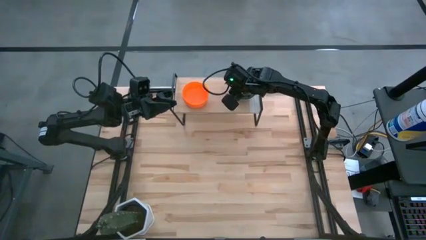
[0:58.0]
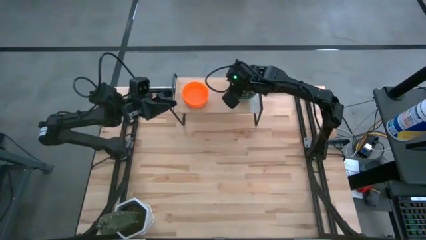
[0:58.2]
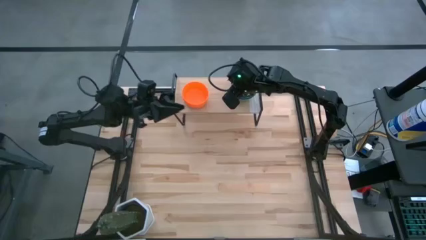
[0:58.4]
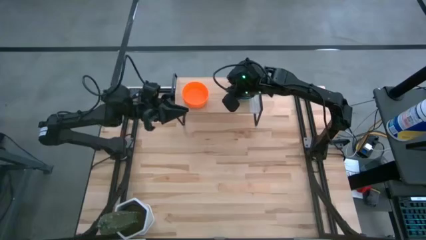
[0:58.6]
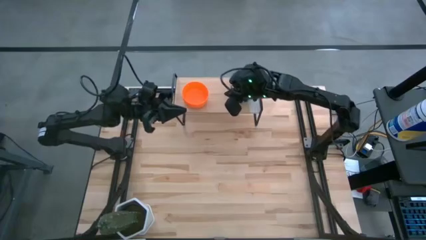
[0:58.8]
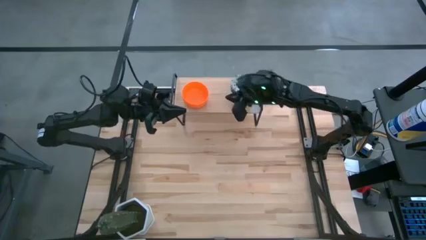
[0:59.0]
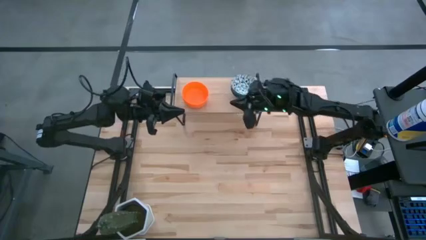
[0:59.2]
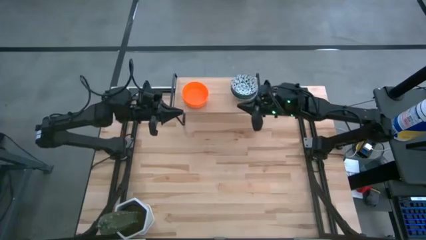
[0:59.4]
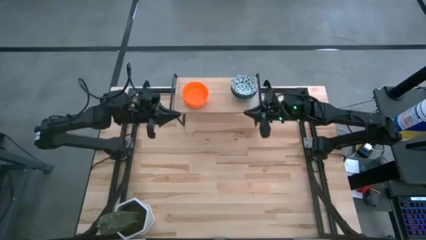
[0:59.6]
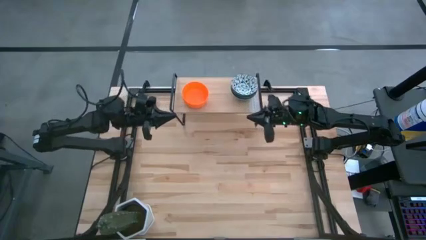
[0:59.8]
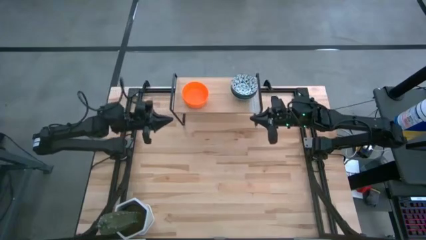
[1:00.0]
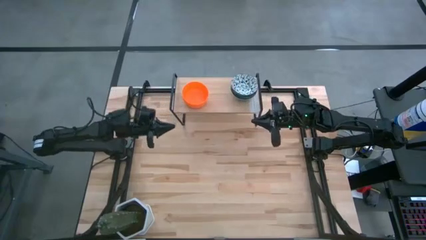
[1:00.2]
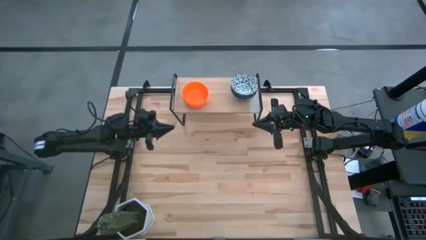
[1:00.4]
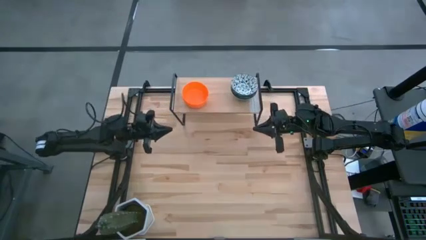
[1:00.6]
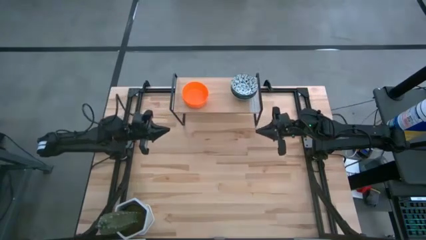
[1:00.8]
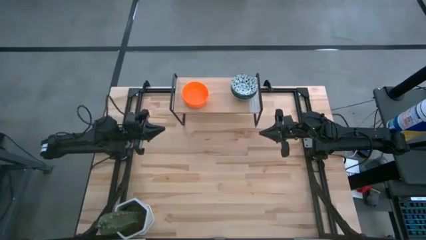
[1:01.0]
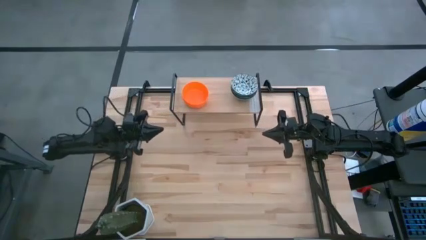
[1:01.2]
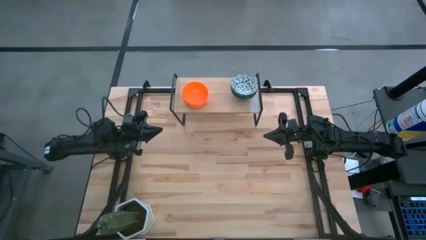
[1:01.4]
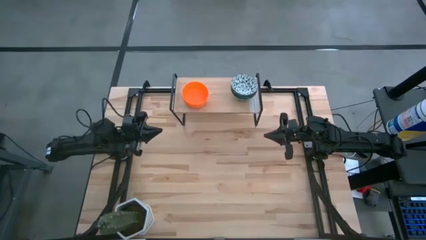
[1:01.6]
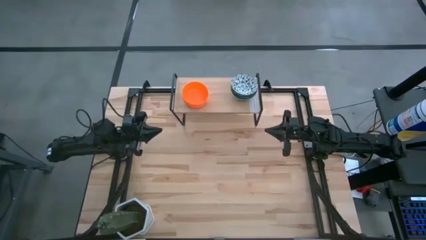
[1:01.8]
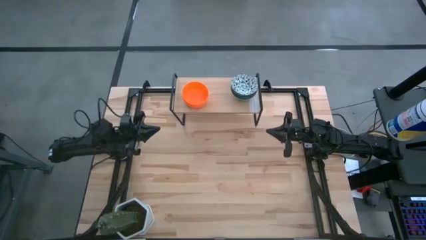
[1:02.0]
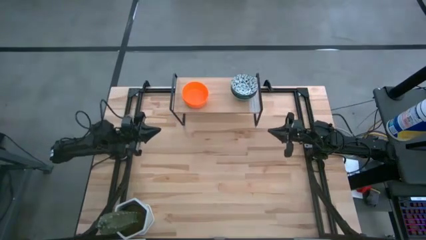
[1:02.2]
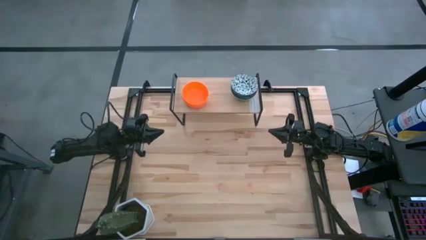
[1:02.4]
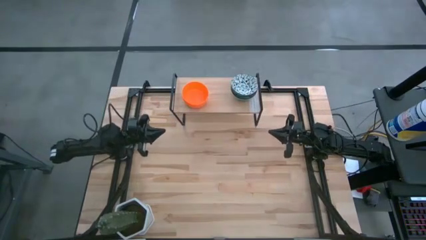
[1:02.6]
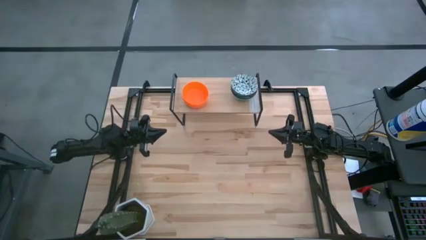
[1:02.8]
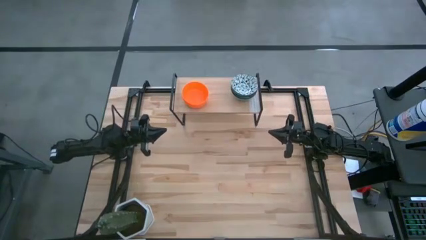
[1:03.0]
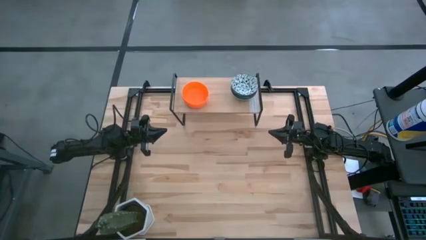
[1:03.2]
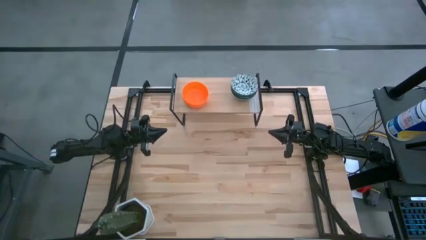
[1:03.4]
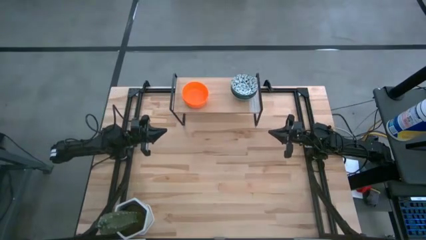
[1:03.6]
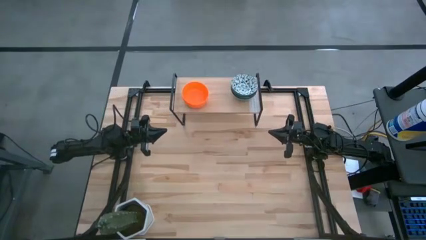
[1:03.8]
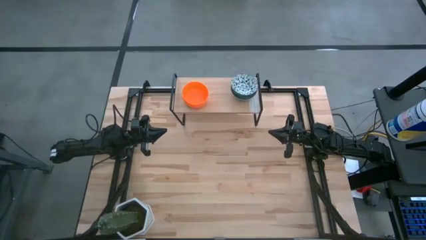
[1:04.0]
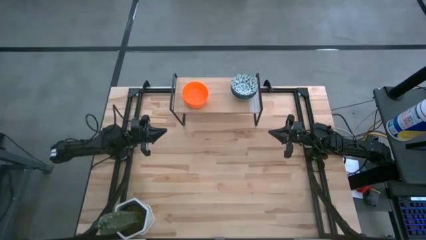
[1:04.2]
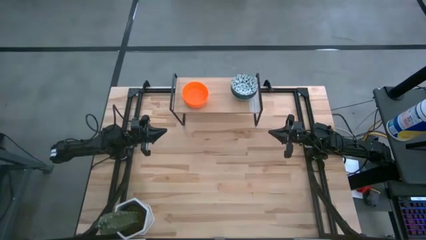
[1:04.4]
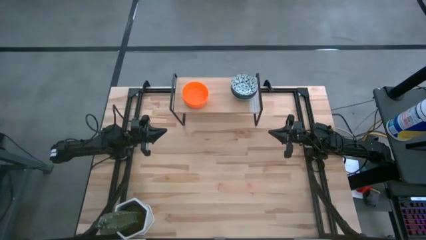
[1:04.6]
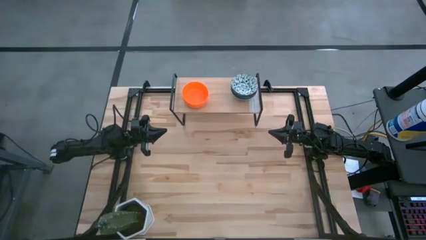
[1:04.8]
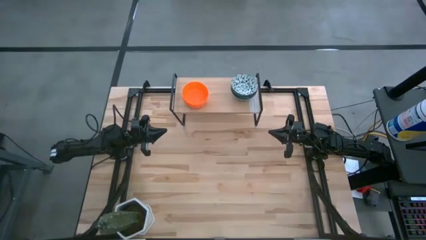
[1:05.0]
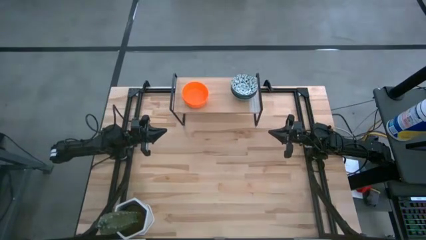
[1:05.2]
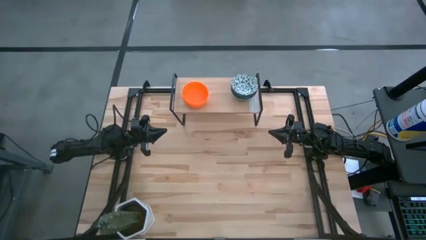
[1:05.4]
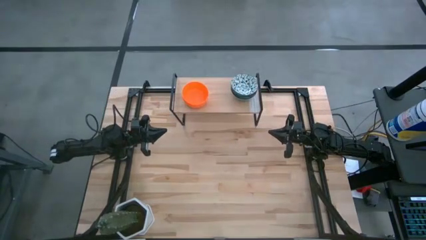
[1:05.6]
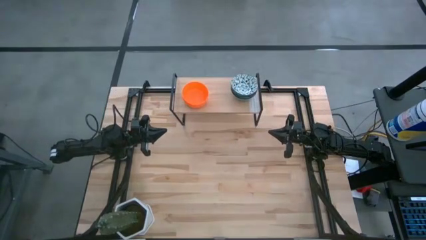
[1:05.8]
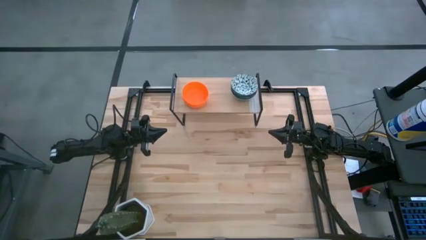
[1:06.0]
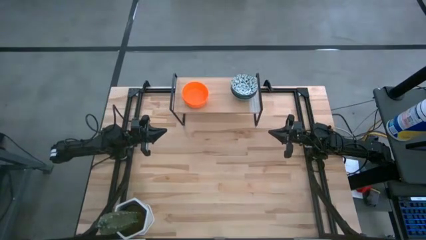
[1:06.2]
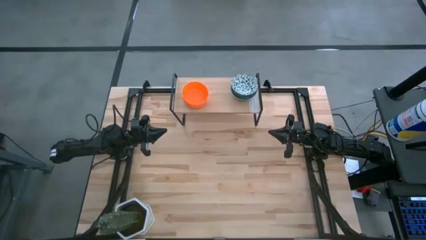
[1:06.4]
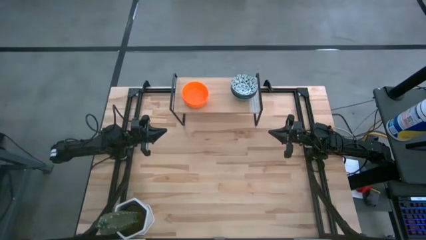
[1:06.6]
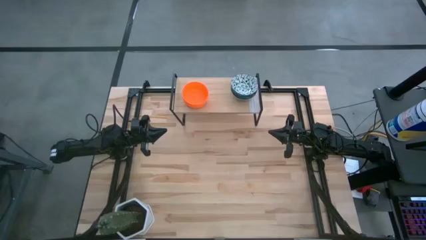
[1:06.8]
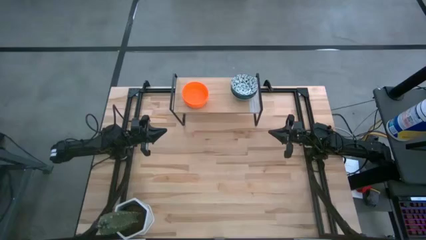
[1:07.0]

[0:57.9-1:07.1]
Task: Pick & Place Mini bowls
Return to Home Position

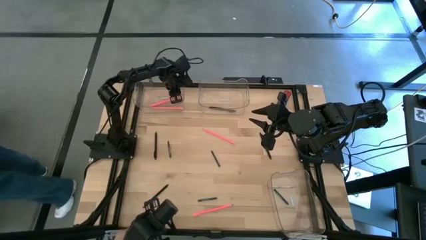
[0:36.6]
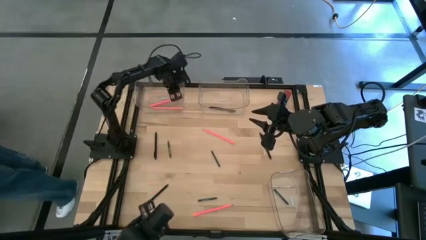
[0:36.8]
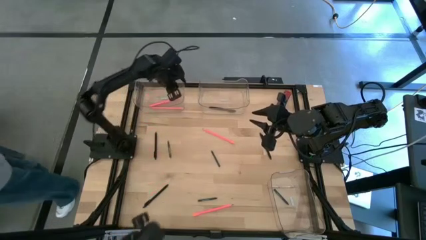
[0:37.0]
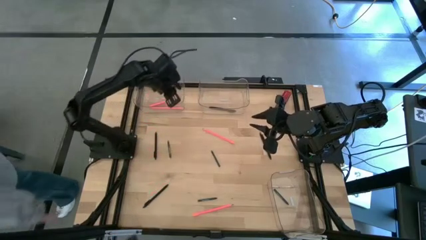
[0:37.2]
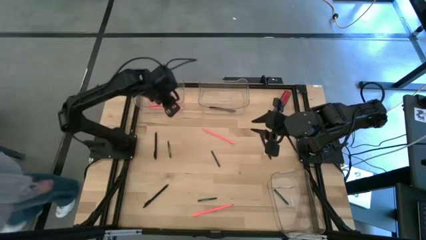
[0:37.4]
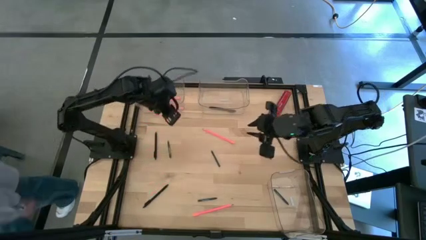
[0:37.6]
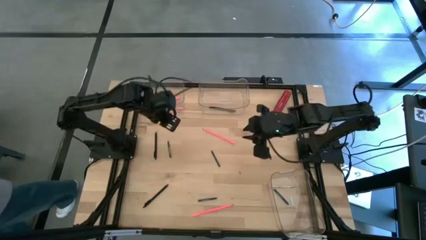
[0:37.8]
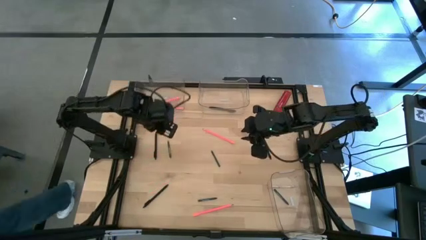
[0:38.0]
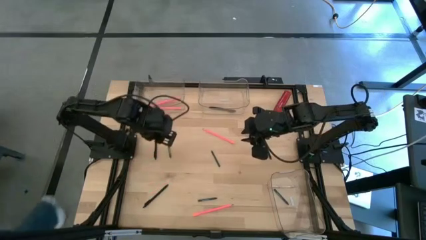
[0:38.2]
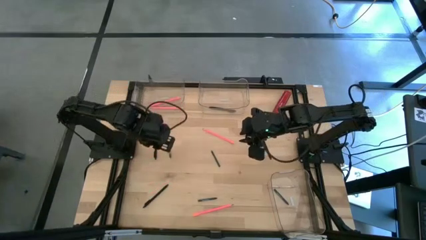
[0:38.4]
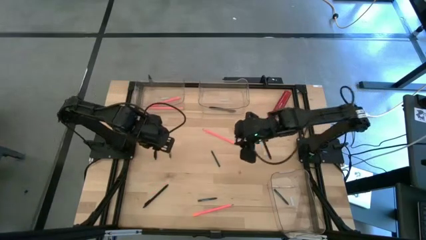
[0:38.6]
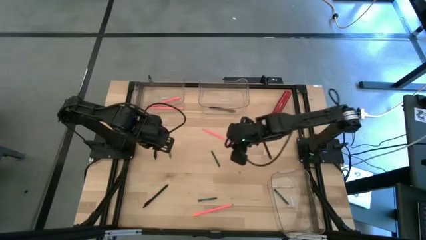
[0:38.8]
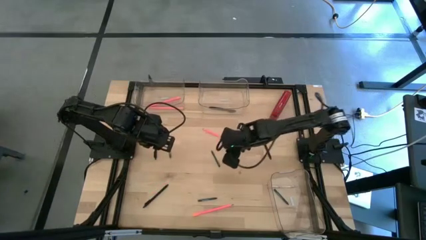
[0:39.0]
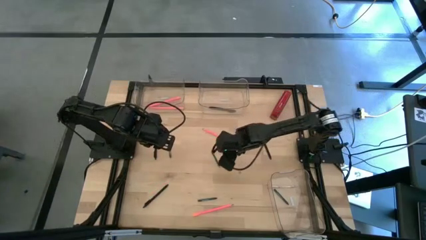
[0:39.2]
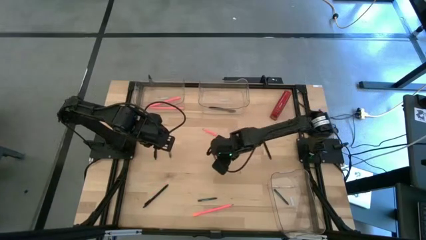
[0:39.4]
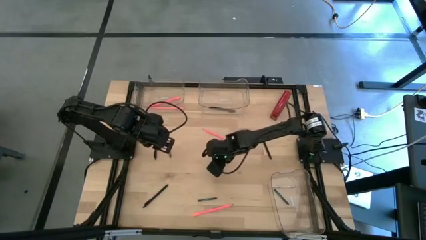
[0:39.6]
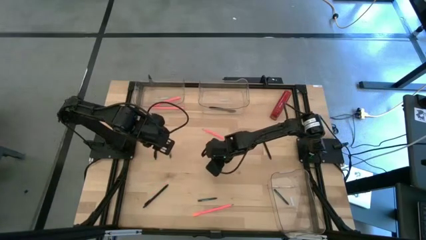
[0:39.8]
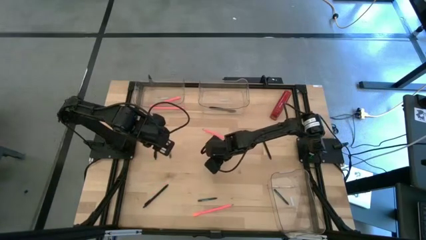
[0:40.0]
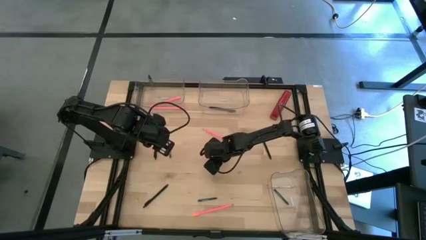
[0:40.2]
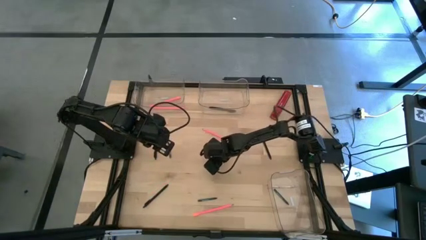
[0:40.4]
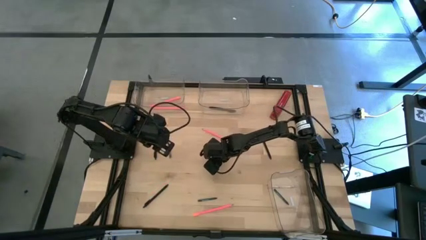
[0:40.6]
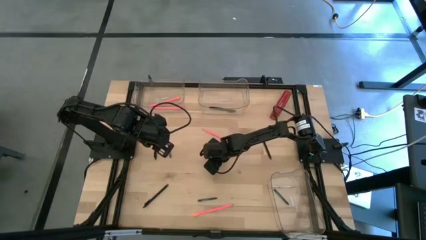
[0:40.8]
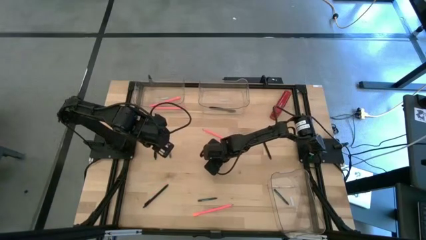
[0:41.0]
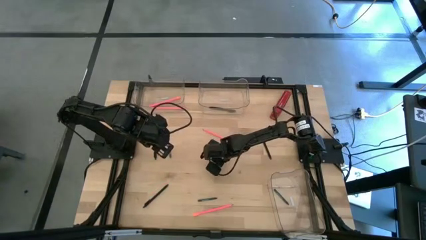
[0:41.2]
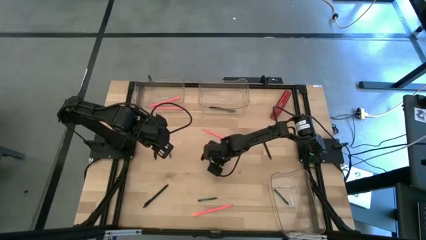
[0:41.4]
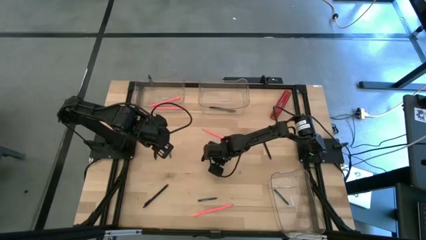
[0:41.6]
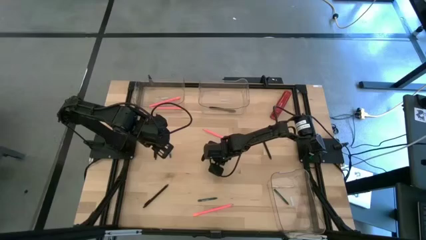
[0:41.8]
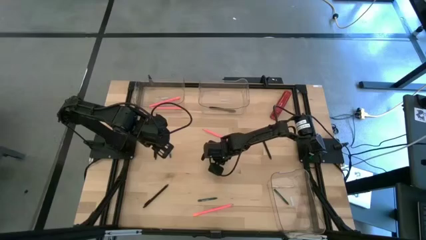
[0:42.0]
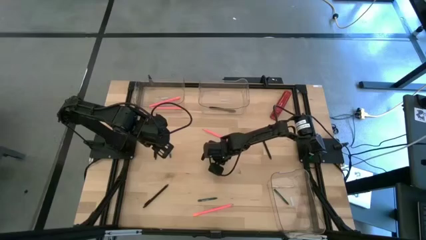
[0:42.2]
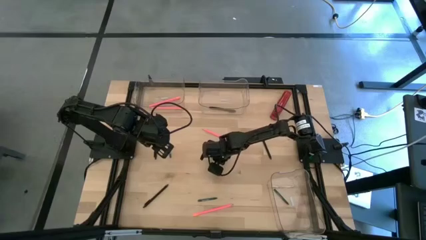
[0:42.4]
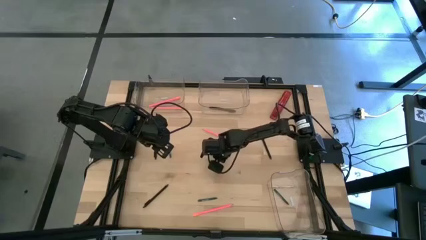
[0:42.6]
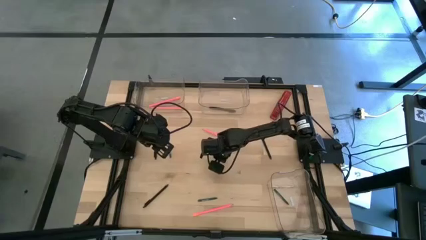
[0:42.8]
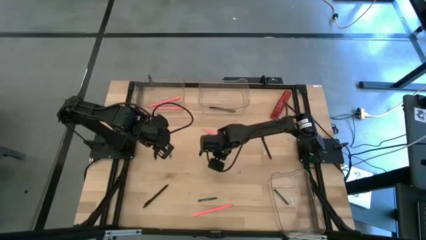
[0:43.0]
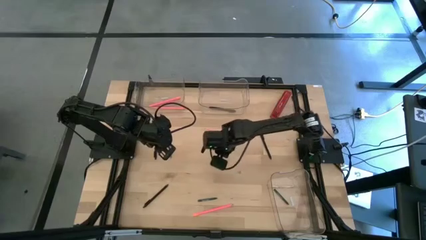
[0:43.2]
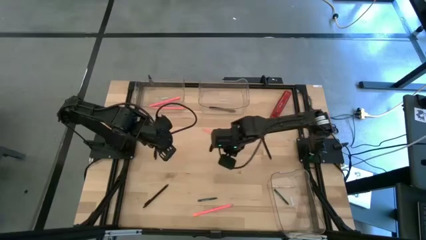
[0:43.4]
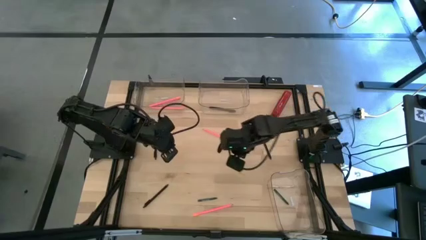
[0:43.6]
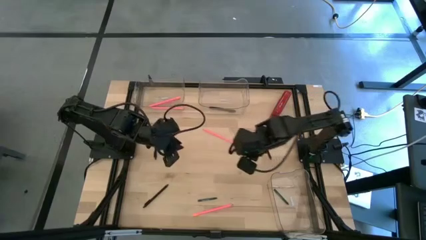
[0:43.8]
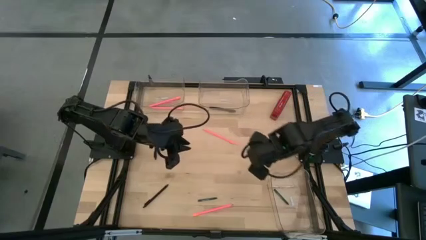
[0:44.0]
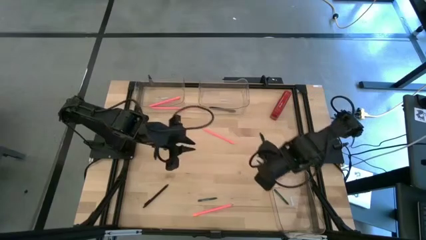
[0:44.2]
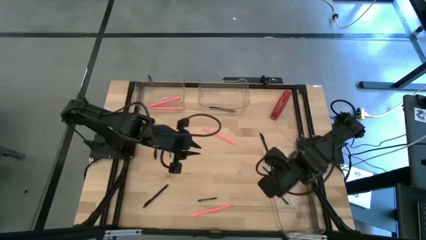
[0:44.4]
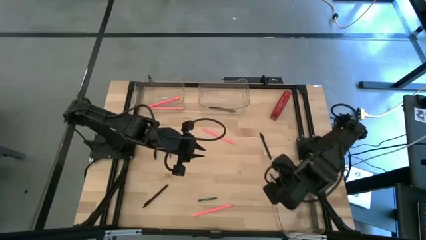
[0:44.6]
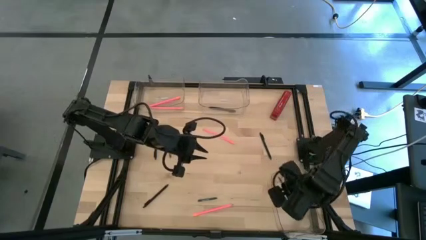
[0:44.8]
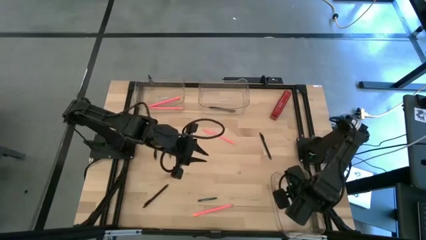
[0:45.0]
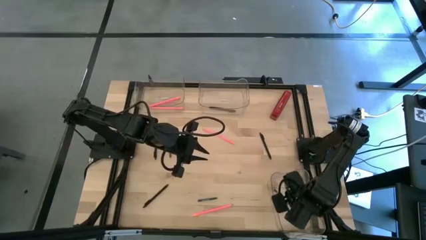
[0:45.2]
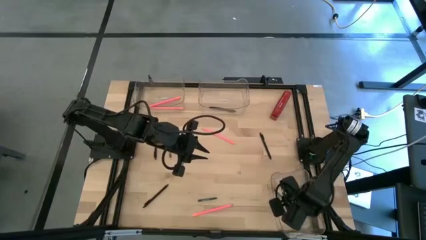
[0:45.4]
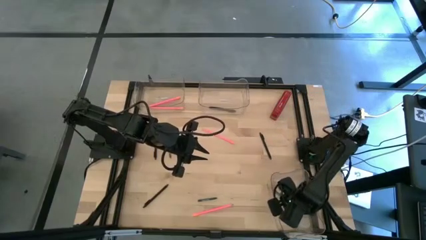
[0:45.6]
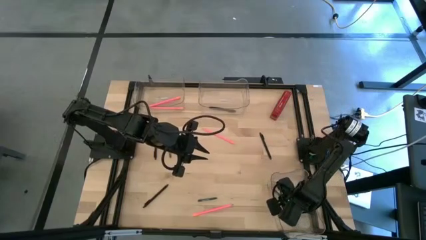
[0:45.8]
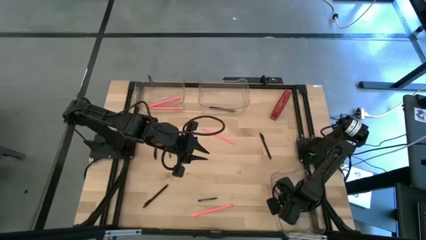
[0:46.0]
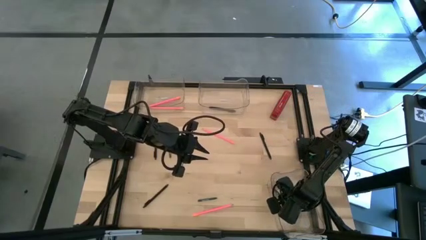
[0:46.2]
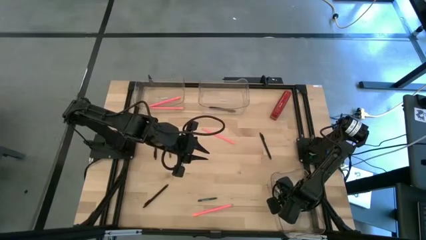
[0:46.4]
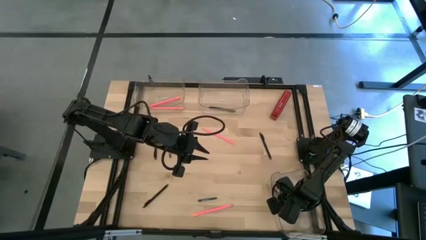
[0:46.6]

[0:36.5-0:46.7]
Task: Sort crayons/erasers/pens/pencils in bins
Put the green crayon into the bottom transparent bin
